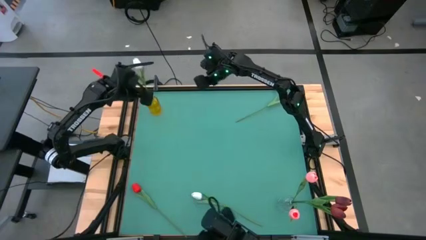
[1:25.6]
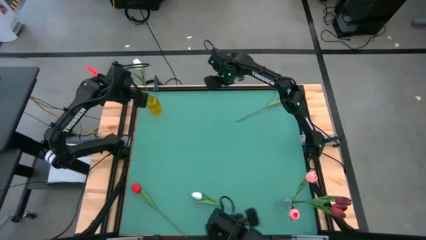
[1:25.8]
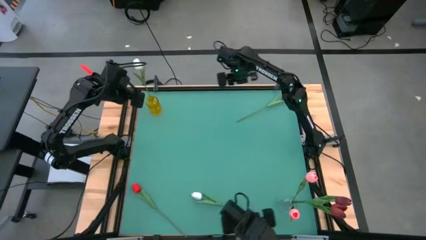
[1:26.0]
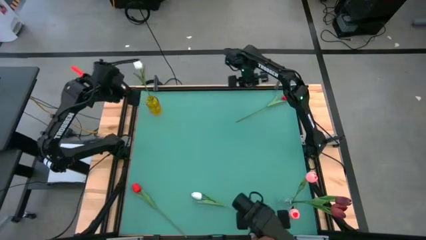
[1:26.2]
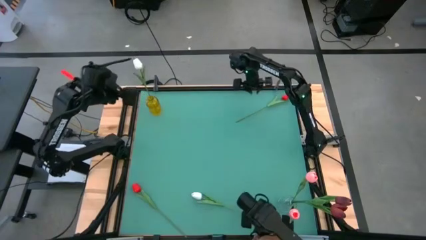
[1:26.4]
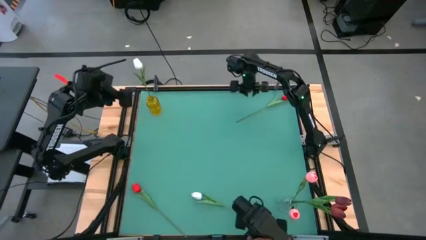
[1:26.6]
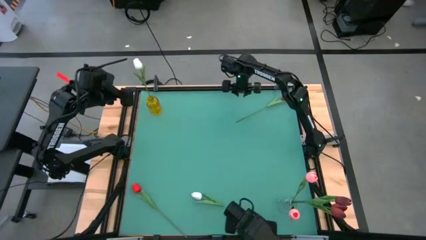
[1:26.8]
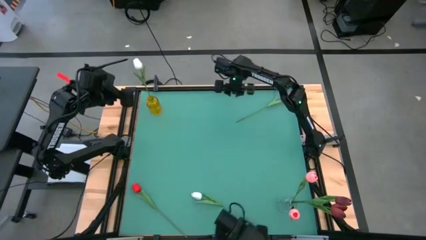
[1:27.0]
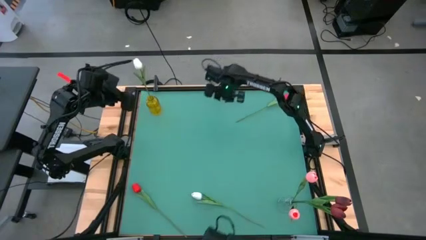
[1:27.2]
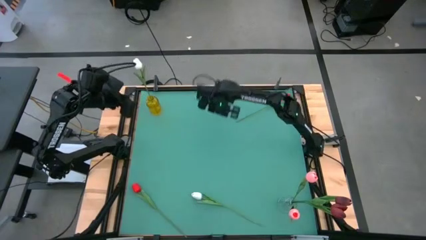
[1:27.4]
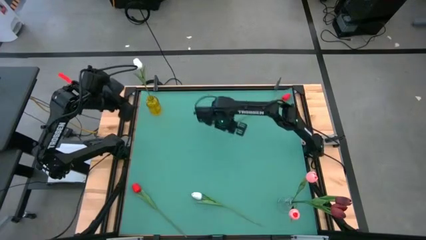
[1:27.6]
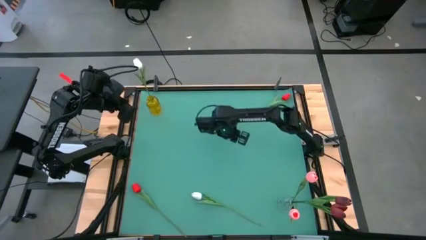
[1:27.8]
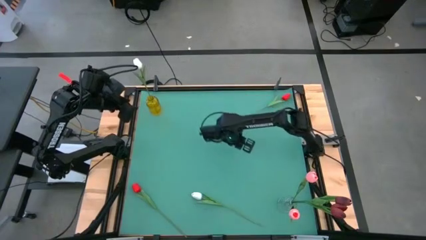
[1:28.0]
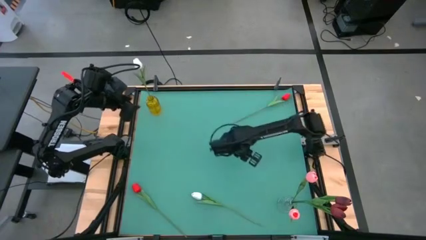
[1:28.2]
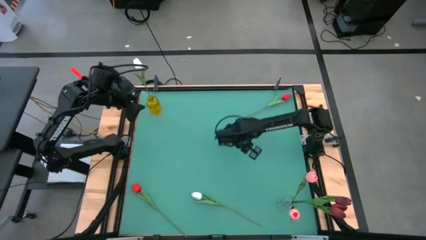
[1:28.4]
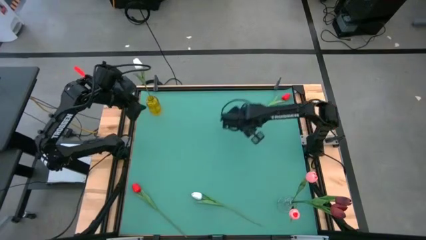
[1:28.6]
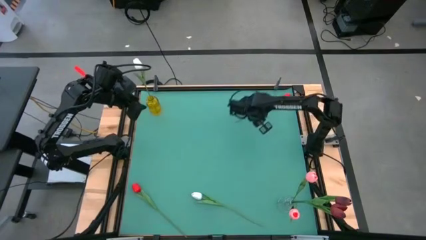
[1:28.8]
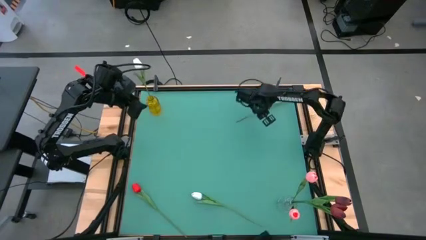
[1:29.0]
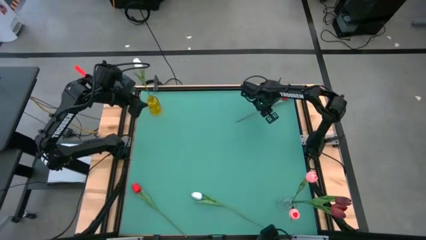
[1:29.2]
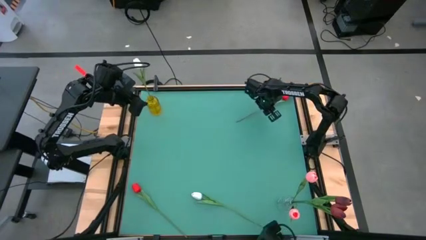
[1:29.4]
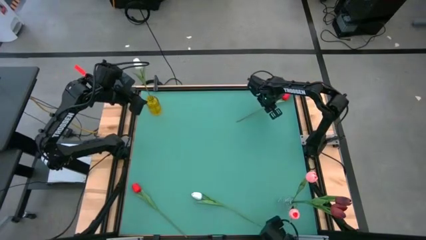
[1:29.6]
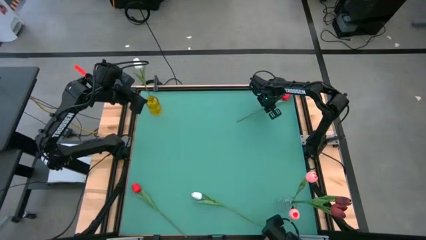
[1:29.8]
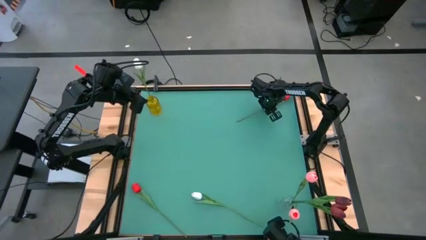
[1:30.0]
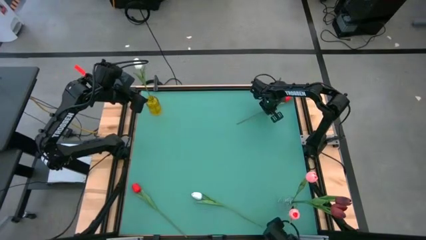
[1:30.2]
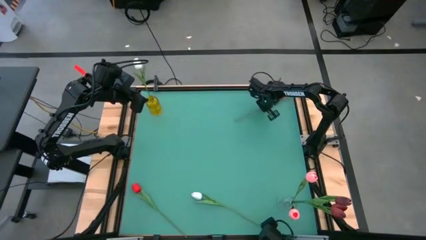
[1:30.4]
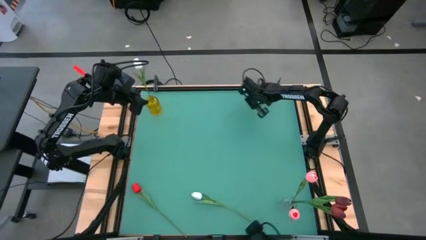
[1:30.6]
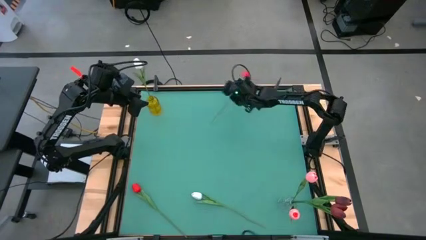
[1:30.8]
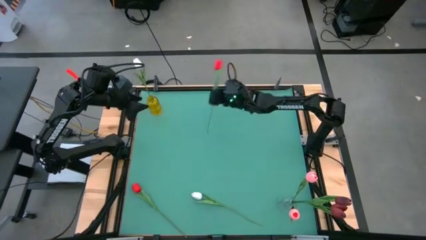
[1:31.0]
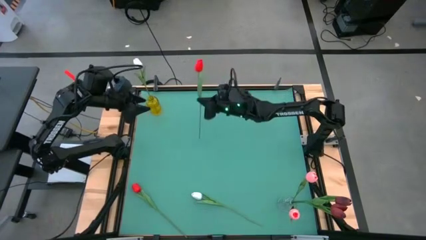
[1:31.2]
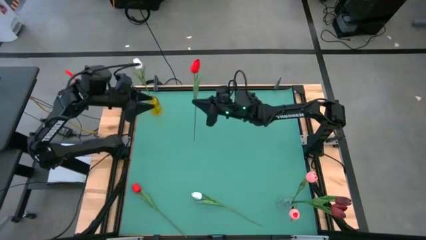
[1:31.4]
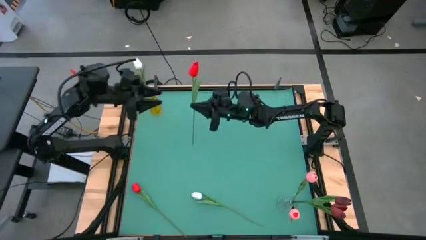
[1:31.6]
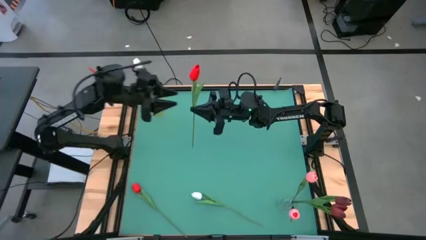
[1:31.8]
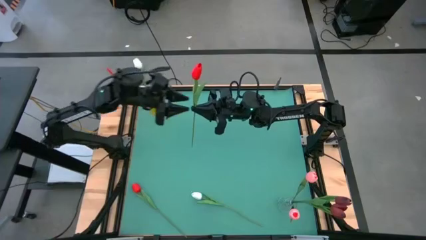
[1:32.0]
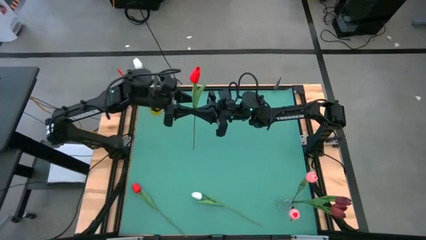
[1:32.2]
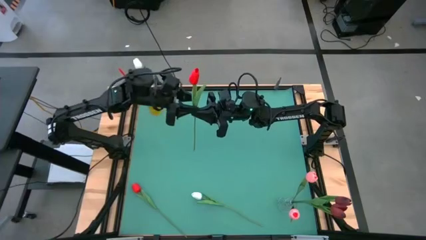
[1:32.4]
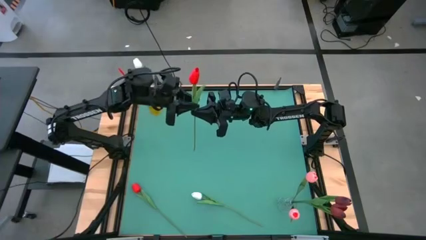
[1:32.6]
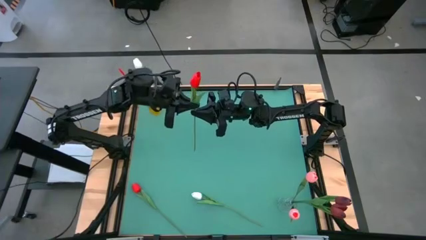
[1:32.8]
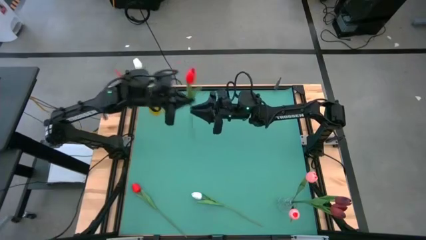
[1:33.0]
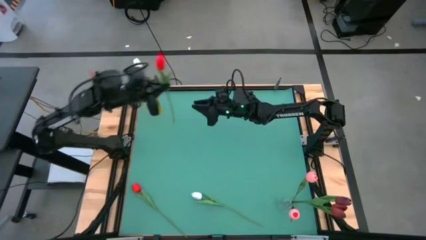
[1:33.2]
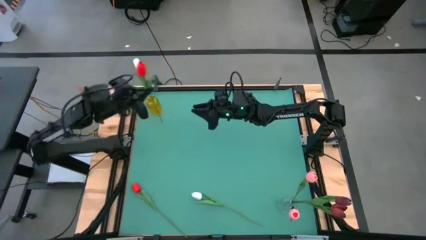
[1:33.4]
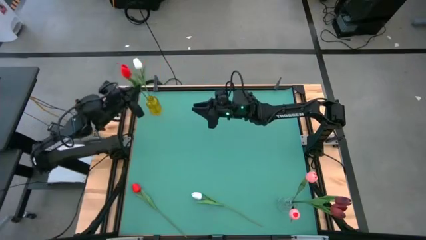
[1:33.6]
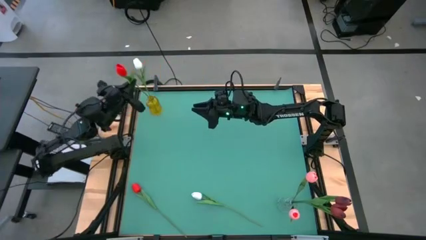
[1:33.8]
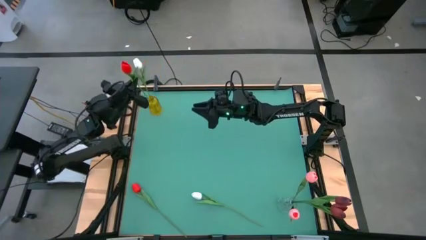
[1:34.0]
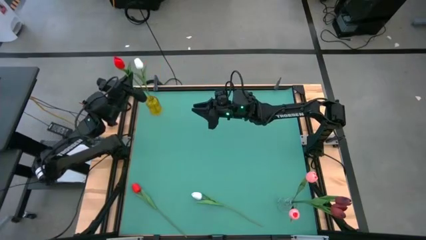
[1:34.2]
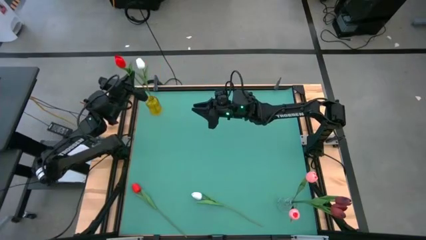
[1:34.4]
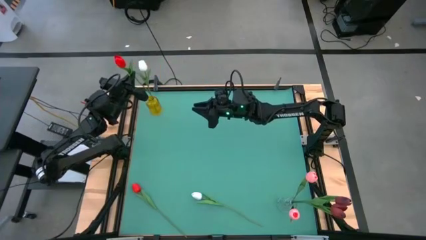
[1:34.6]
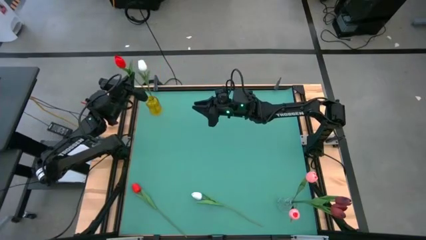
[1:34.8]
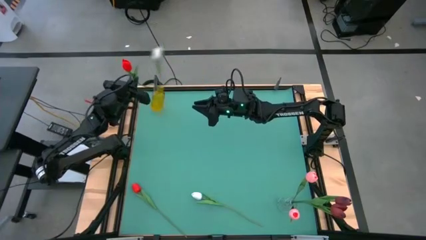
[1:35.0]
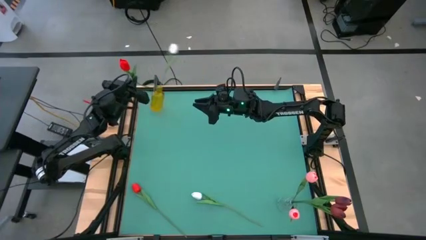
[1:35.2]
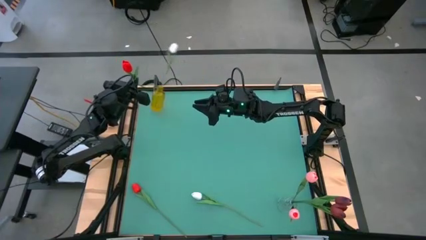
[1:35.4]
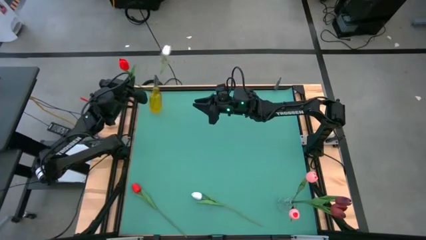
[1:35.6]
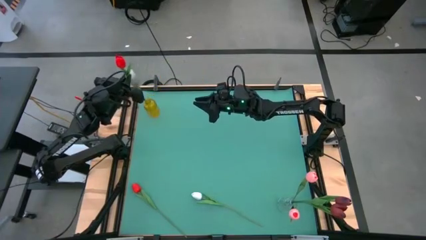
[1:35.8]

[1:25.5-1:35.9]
Task: Sort flowers into vase by color
Put the top red tulip in the yellow vase

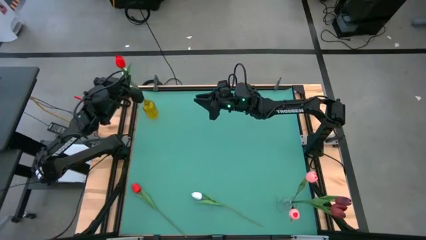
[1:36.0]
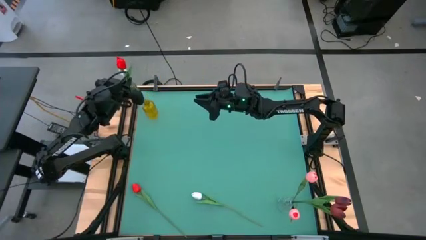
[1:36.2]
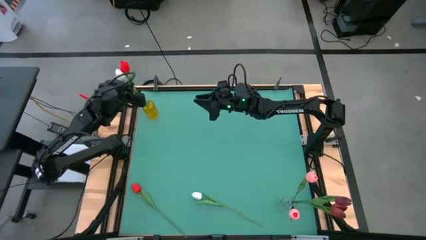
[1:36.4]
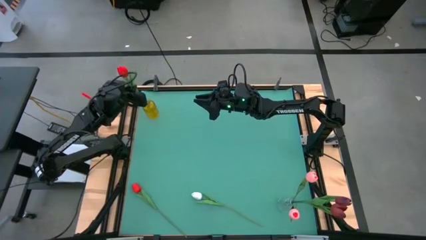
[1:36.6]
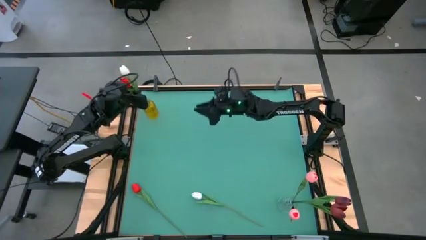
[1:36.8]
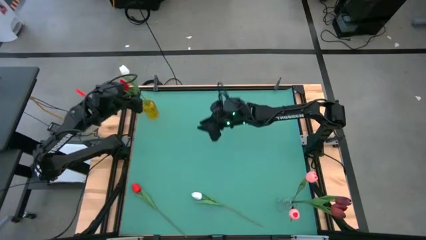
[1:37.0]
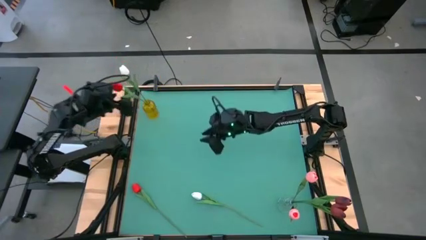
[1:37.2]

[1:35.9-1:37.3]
Put the top red tulip in the yellow vase
